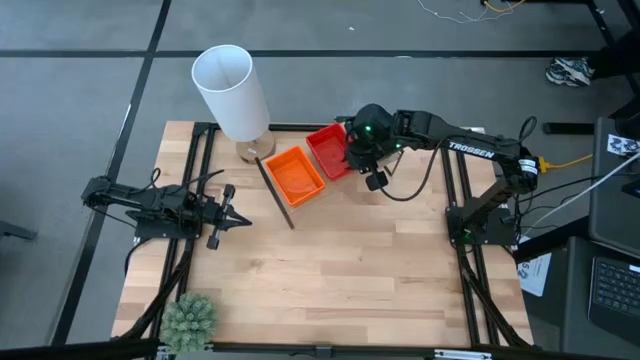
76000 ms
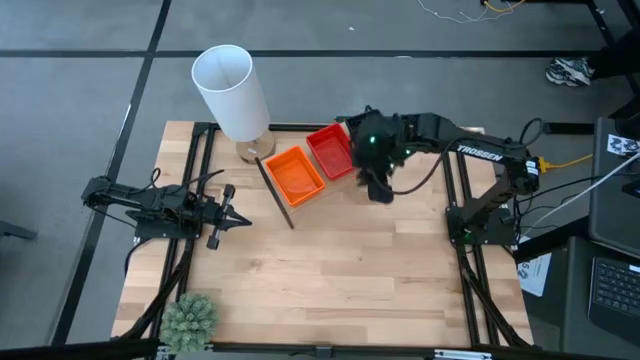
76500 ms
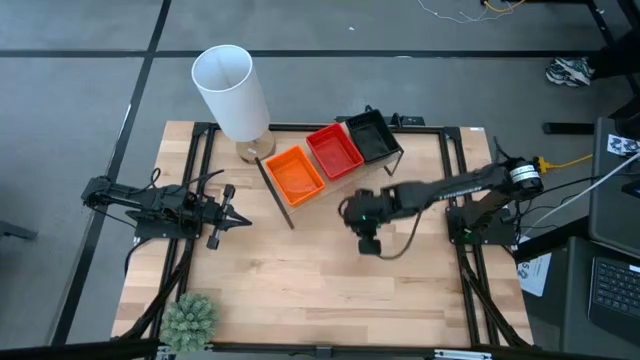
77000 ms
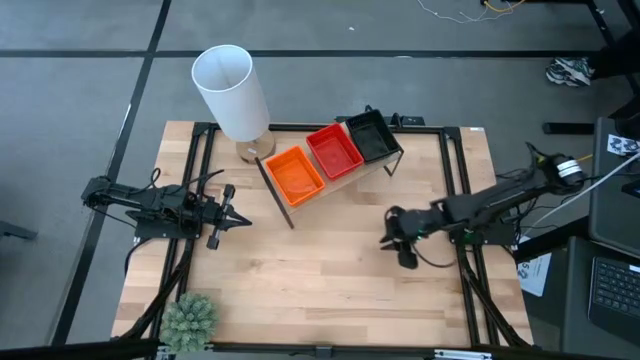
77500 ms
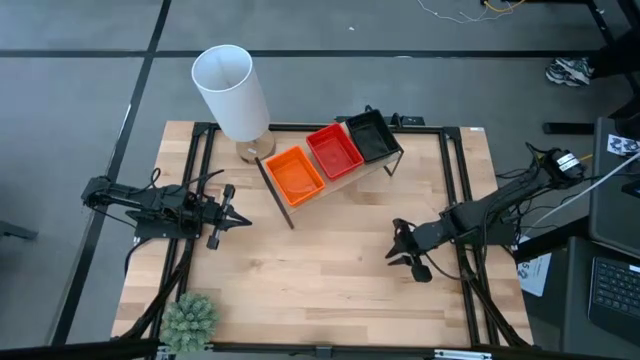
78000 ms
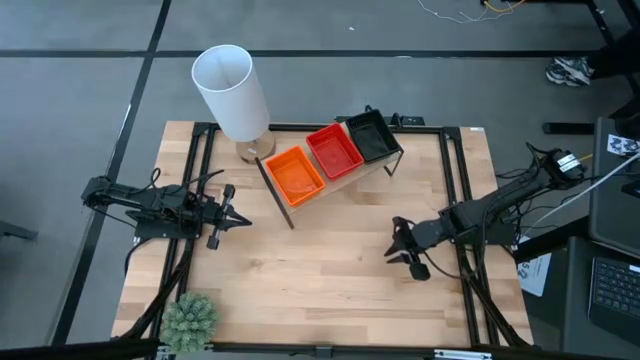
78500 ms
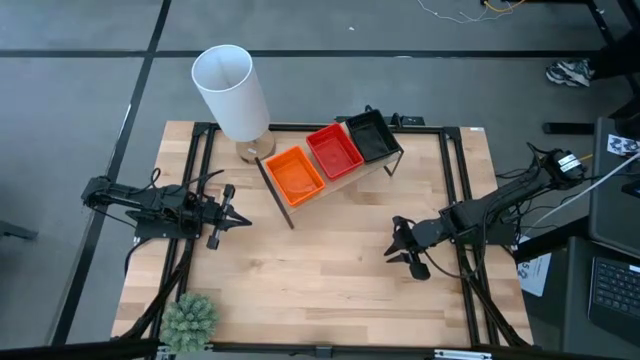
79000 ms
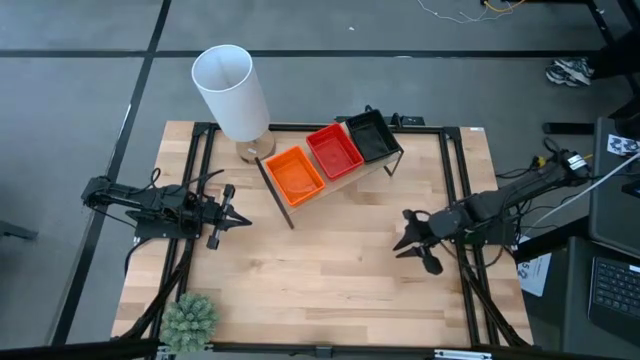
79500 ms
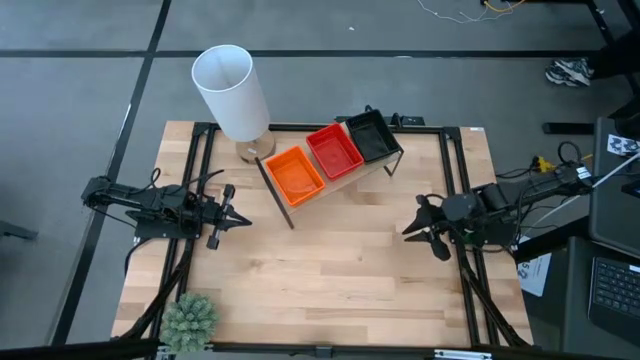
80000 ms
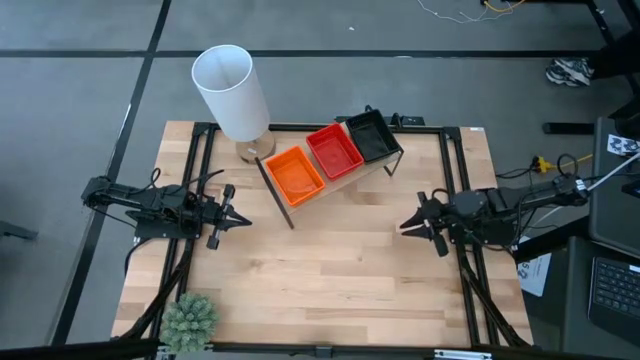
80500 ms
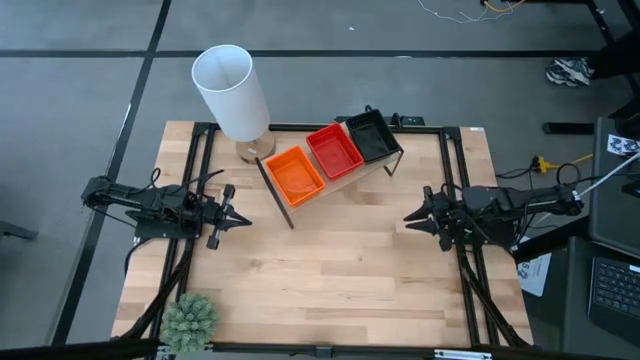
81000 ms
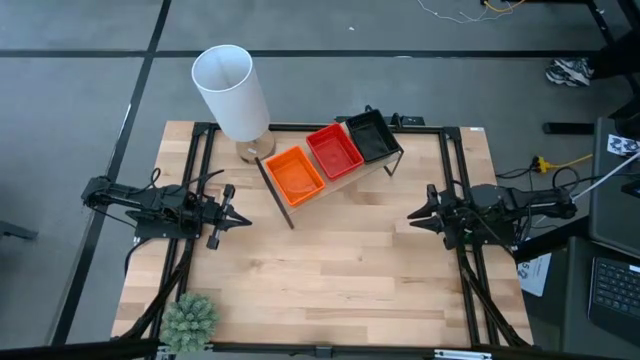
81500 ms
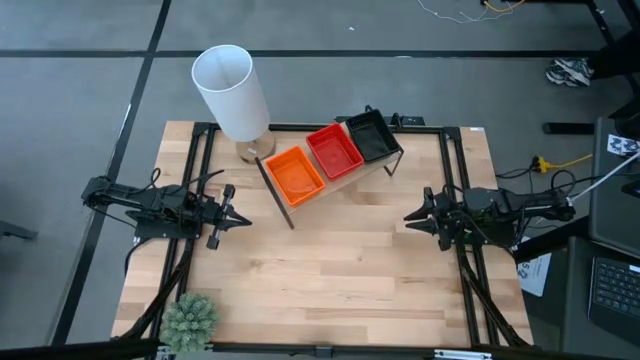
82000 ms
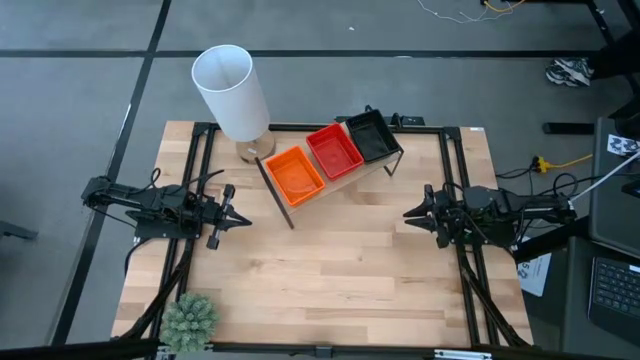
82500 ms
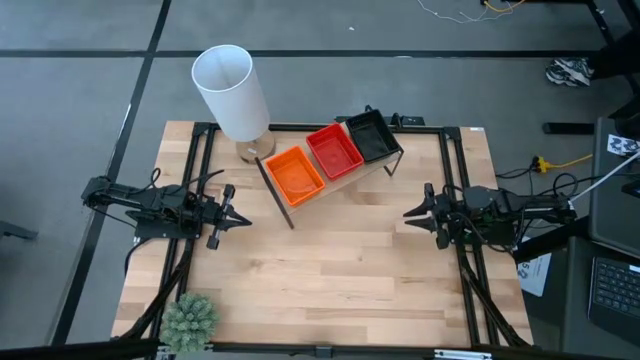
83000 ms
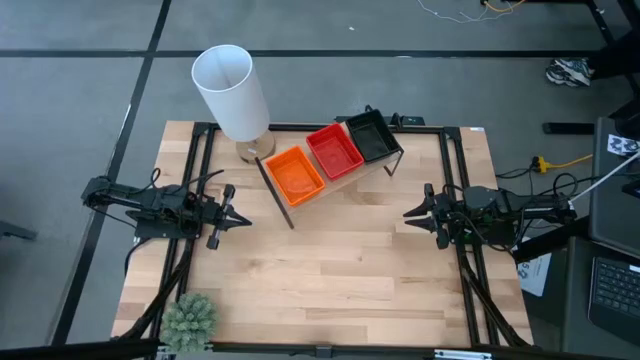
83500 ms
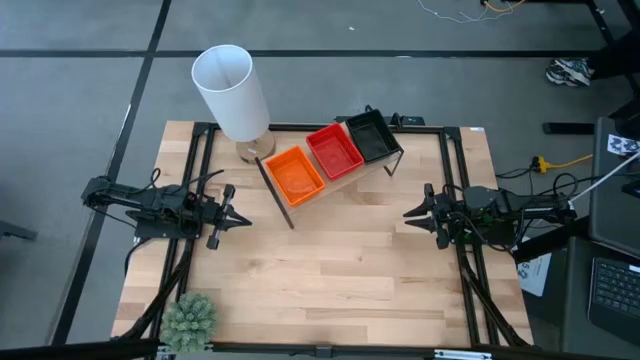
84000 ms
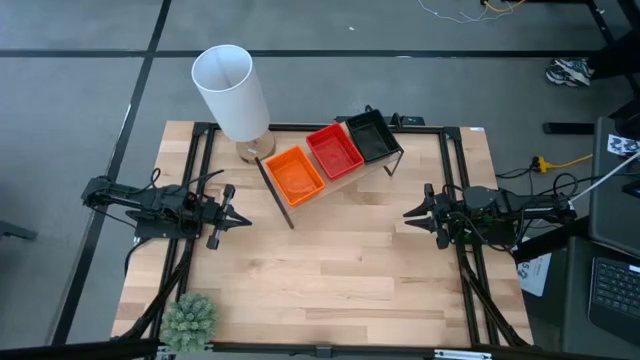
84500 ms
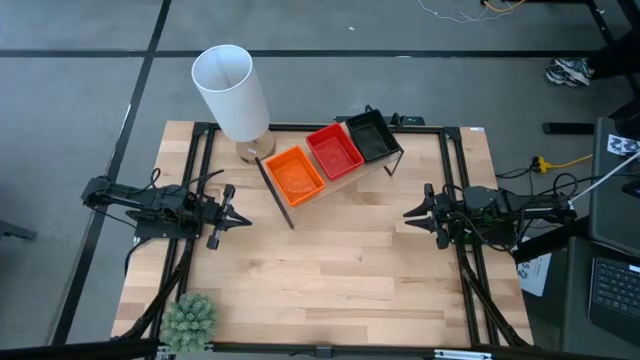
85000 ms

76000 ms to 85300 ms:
Task: Stack baskets on shelf by color
Return to Home Position

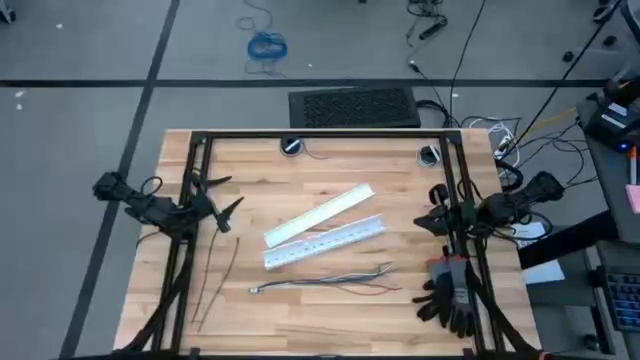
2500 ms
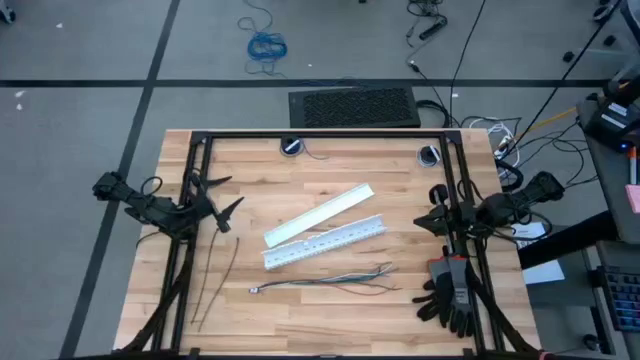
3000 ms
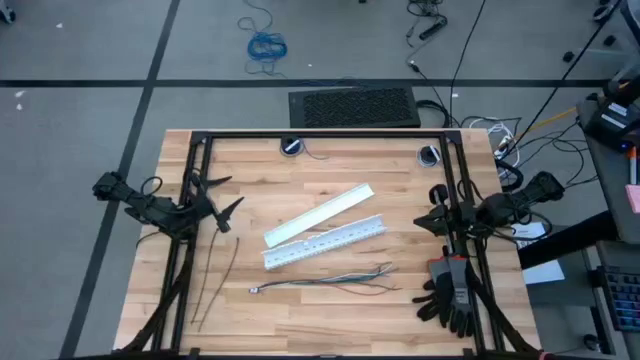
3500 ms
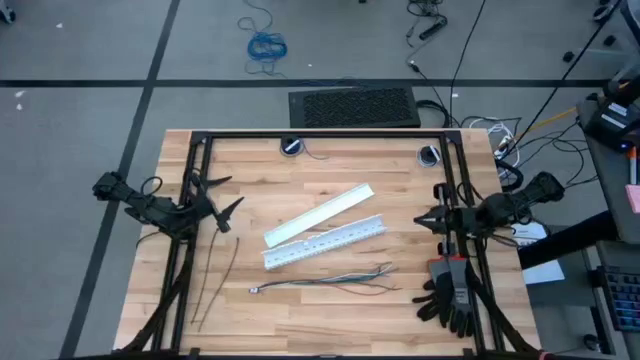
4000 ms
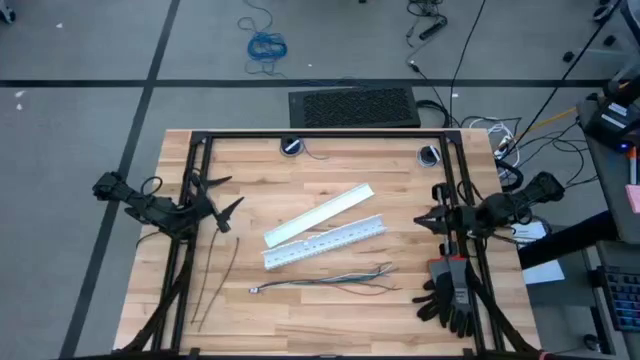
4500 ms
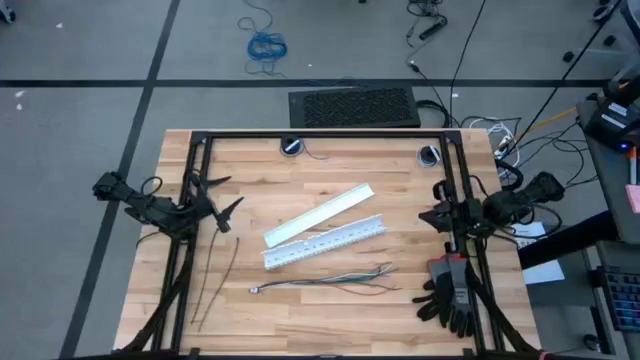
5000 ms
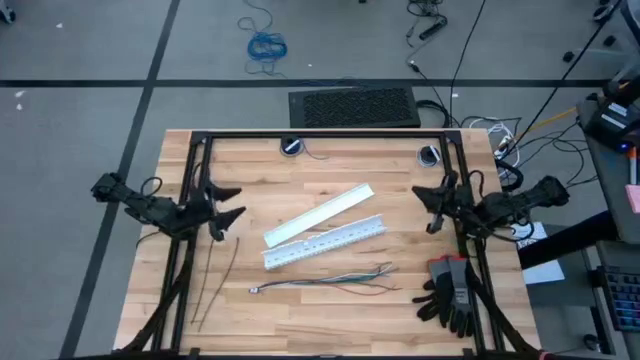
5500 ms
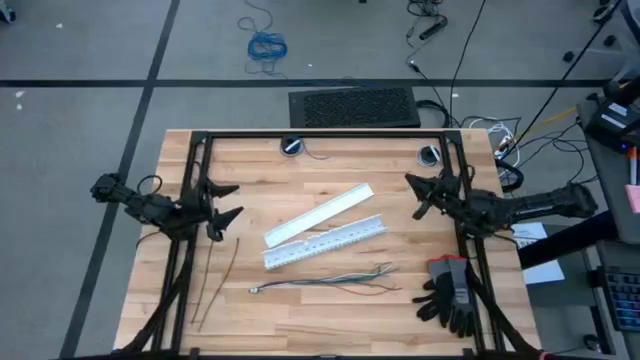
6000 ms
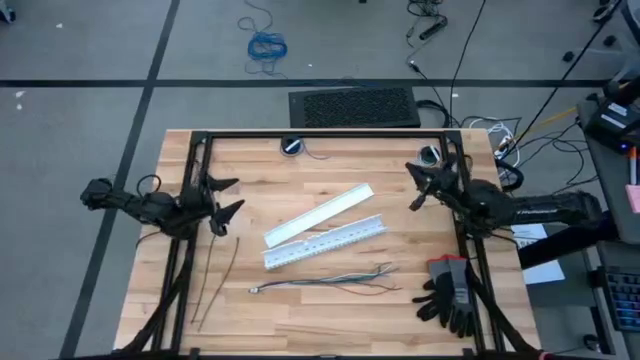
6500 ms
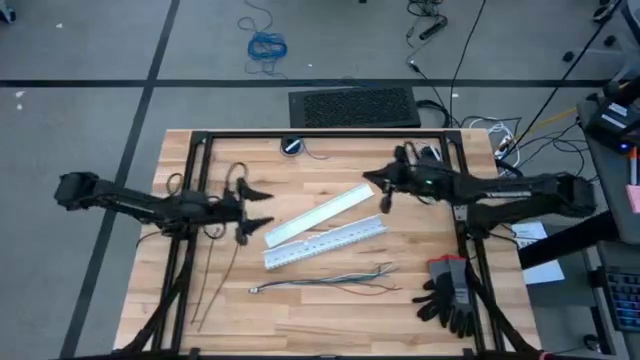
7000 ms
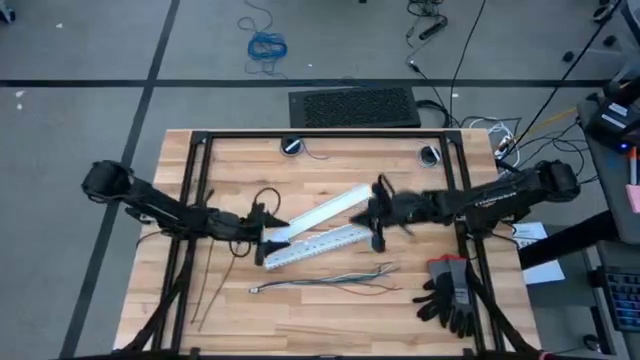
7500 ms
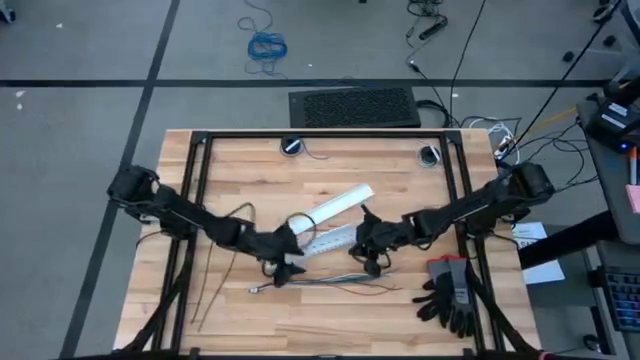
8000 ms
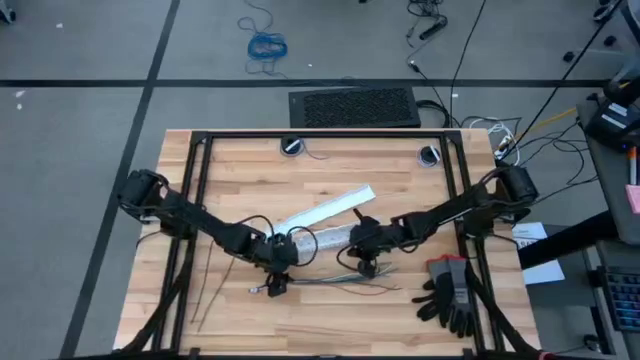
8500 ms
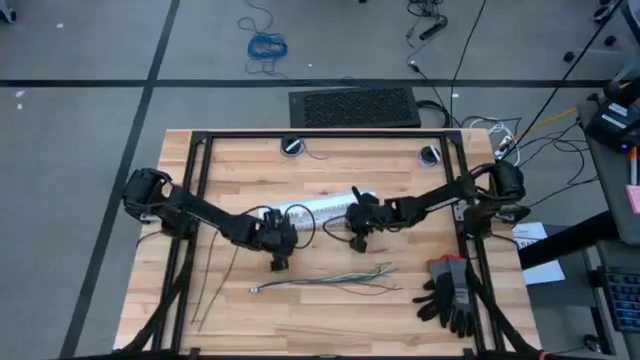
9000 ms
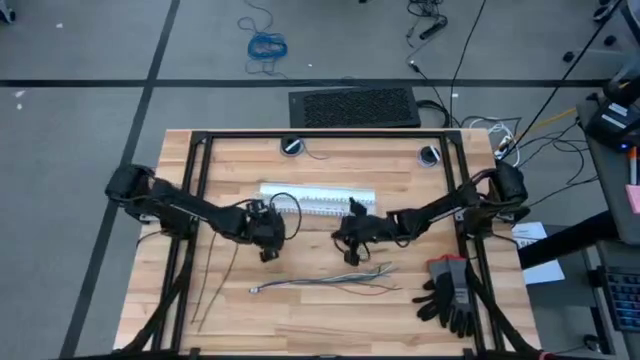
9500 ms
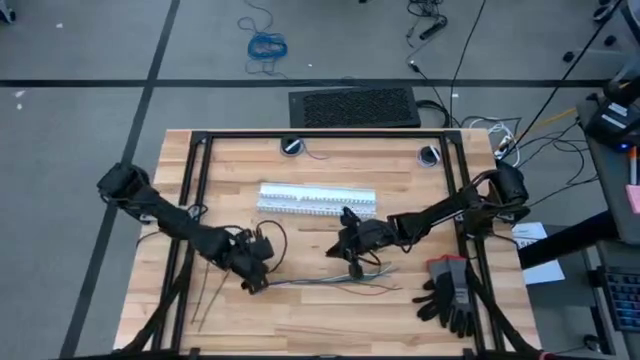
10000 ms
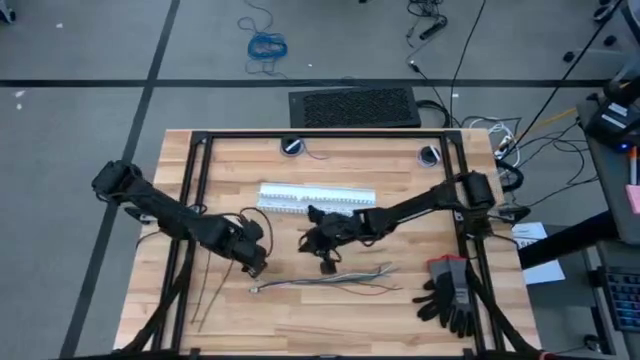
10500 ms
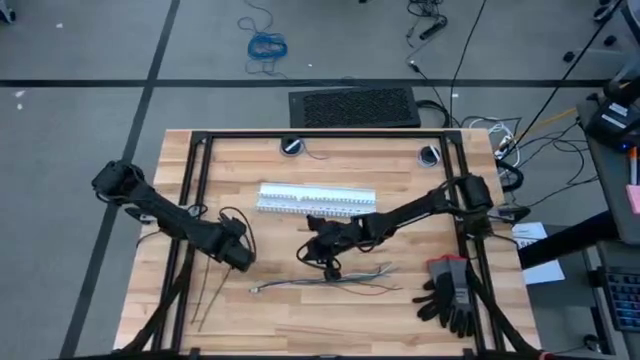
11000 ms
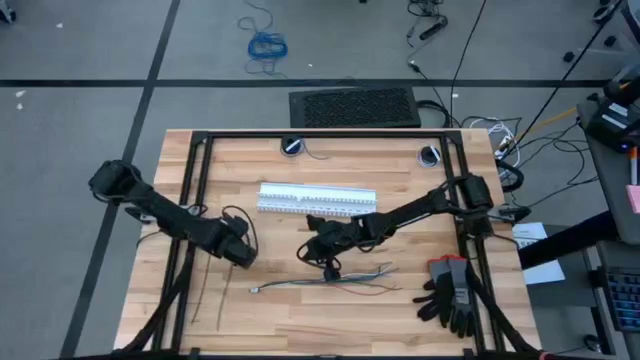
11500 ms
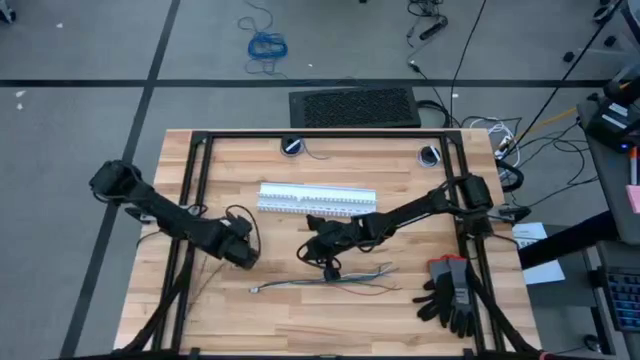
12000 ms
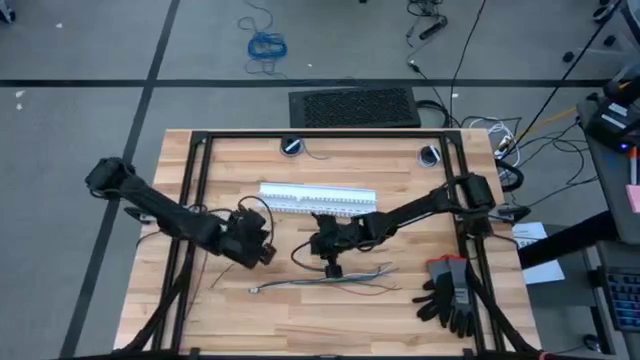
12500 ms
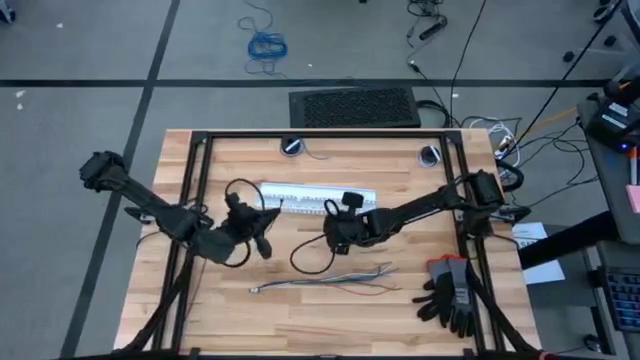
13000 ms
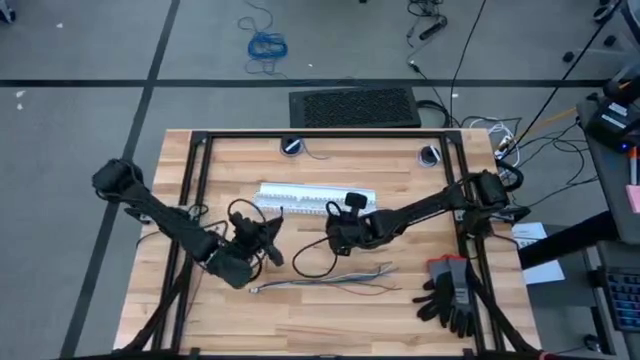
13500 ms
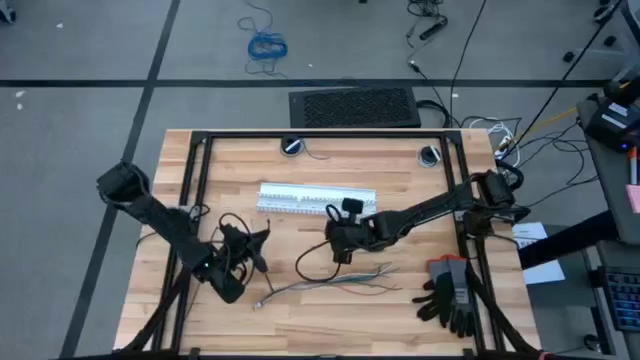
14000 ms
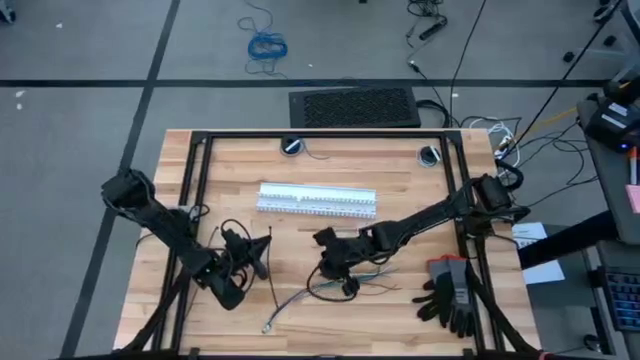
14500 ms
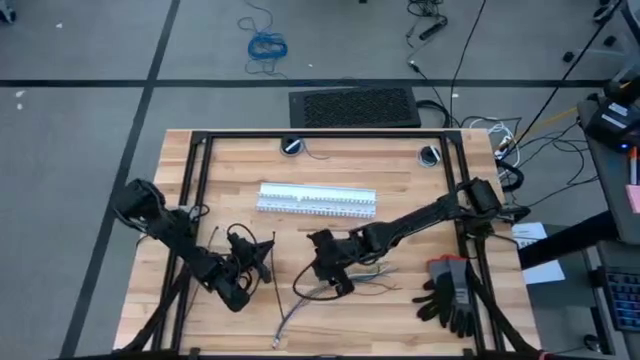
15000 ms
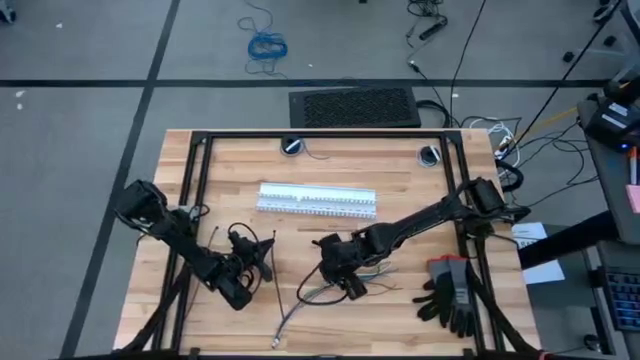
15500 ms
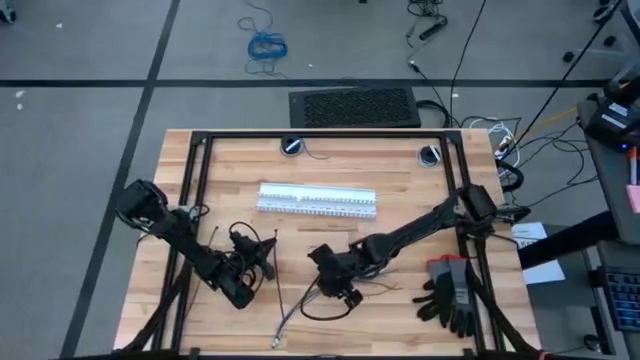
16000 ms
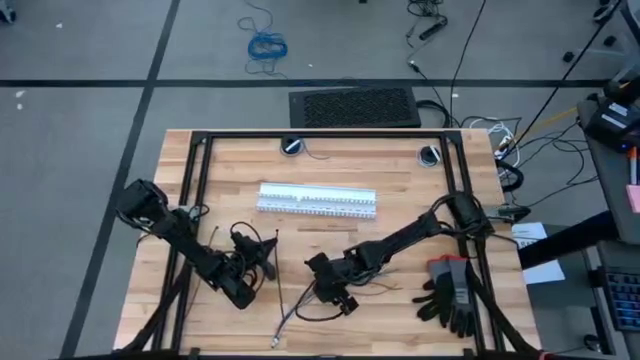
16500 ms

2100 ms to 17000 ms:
Task: Ziptie cables
Wrap the cables together using a zip tie
